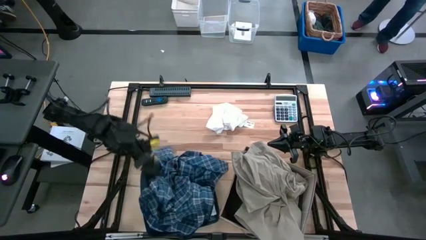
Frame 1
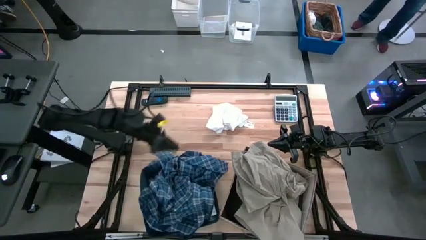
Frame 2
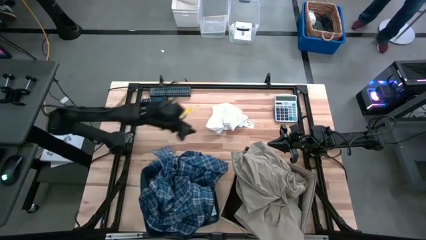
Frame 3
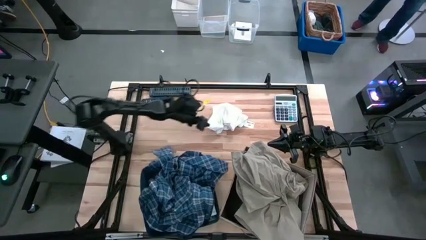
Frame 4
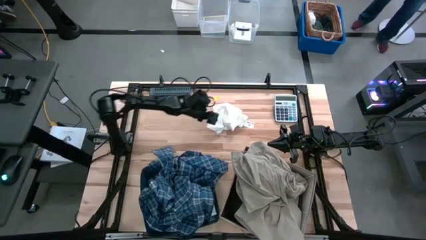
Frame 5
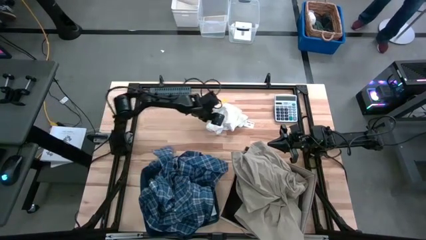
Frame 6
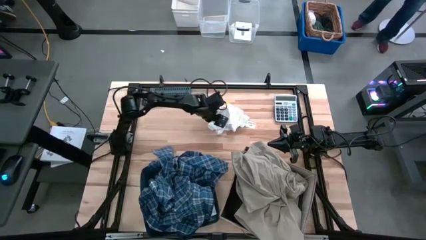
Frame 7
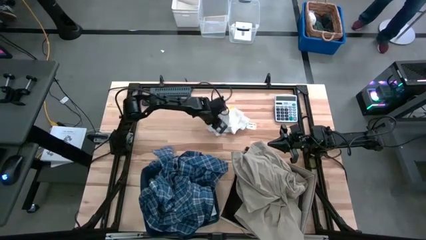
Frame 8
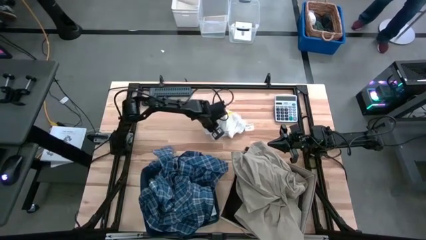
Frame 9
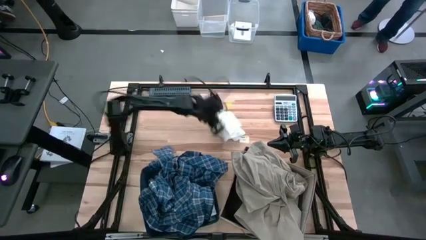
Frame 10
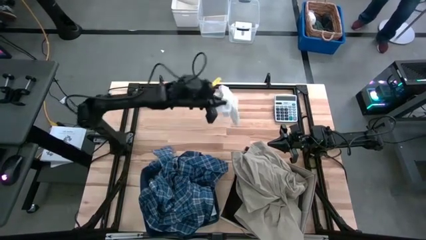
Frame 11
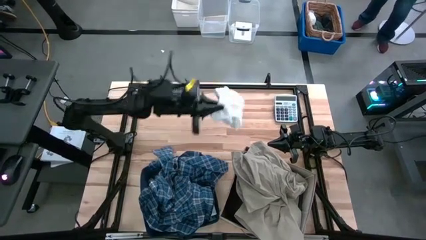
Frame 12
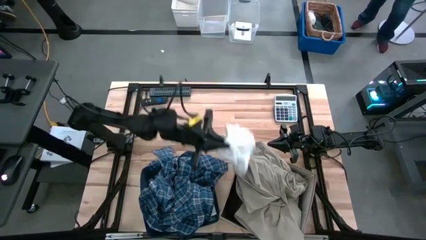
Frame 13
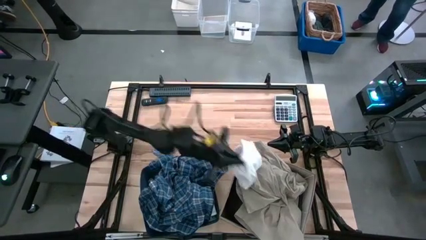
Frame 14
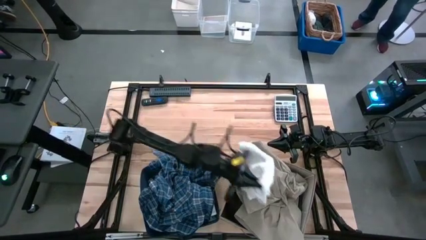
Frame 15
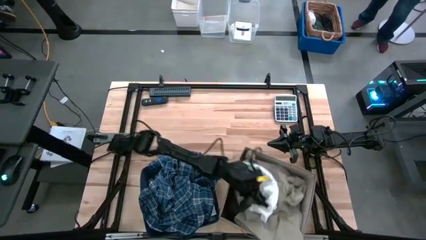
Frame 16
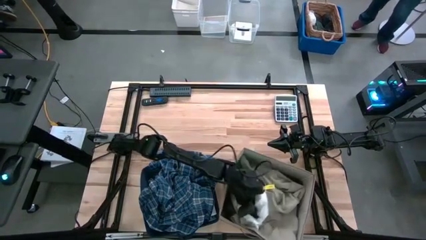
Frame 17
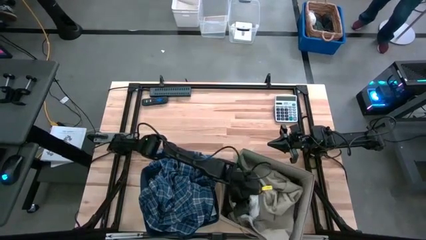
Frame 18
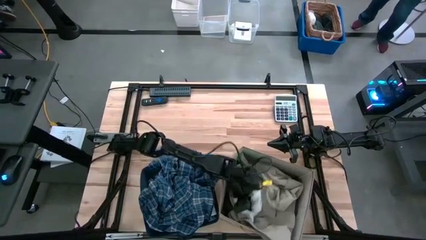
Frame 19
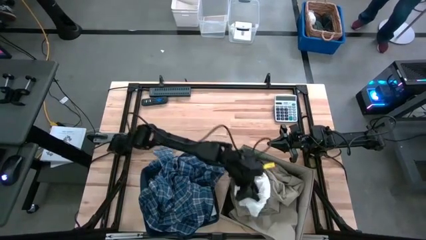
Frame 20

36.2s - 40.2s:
Task: Sort clothes
Put the white shorts into the laundry organizer

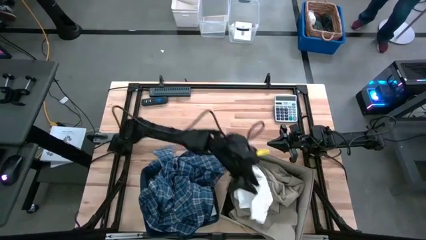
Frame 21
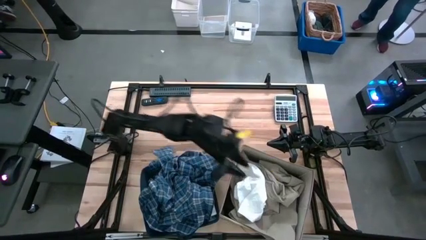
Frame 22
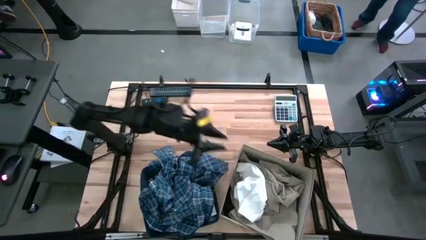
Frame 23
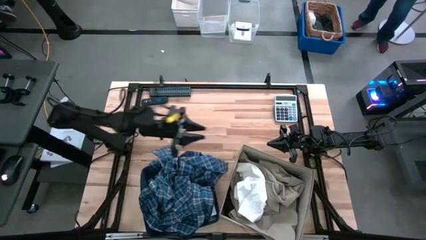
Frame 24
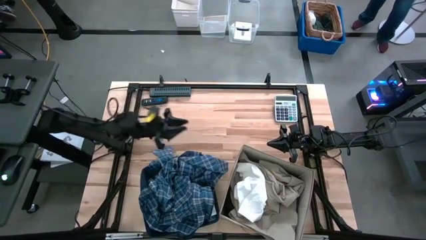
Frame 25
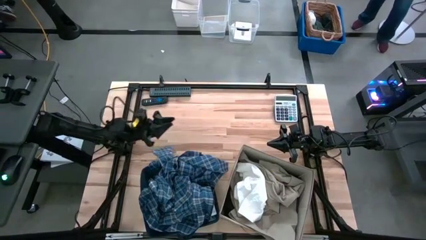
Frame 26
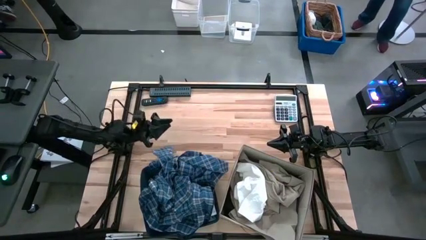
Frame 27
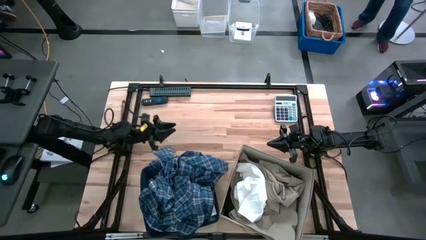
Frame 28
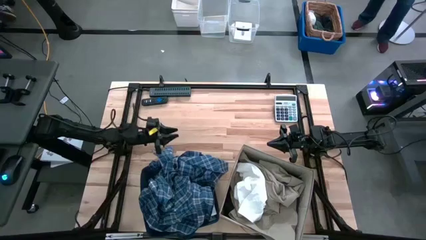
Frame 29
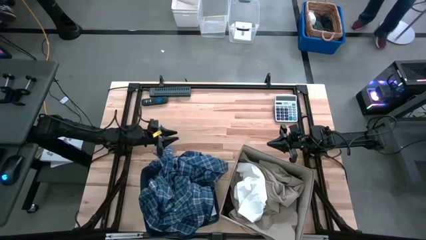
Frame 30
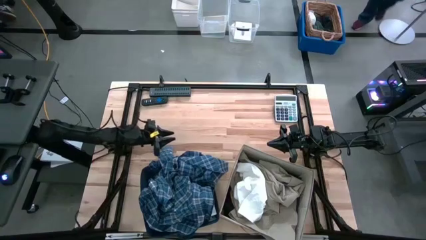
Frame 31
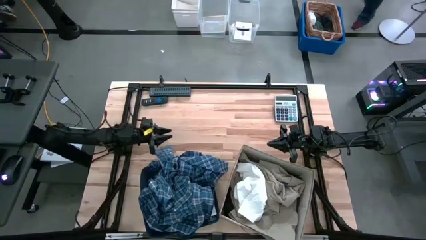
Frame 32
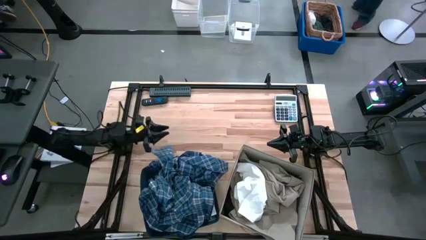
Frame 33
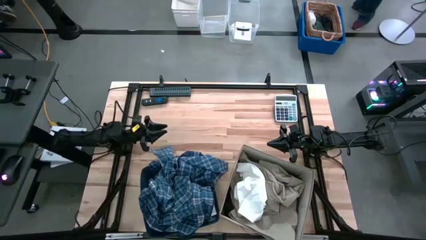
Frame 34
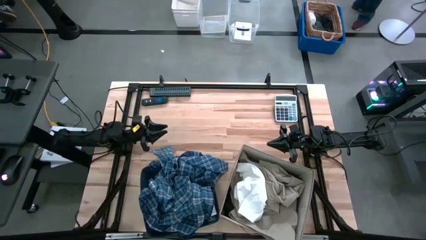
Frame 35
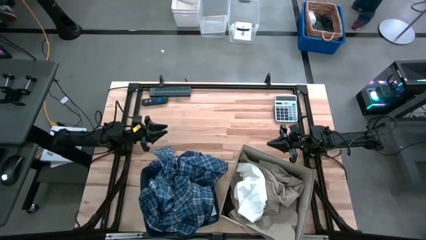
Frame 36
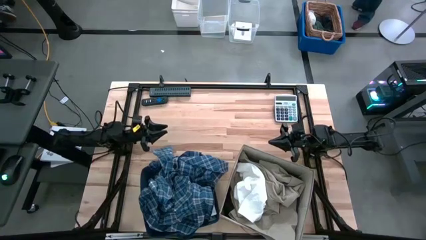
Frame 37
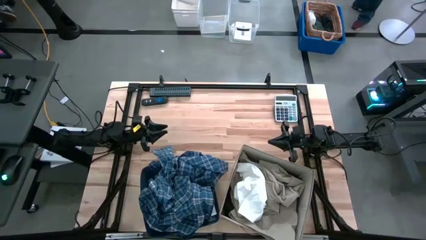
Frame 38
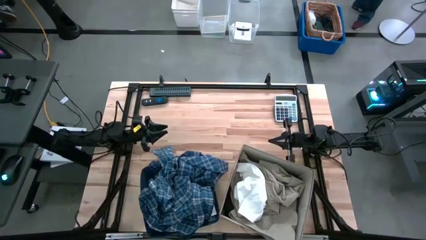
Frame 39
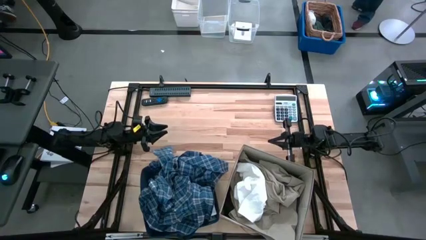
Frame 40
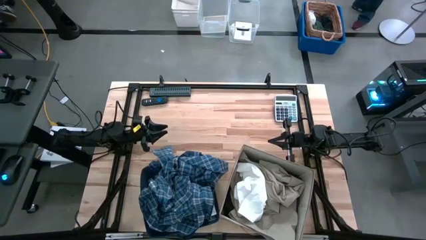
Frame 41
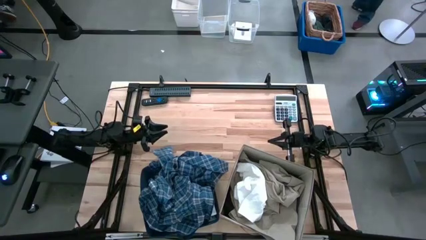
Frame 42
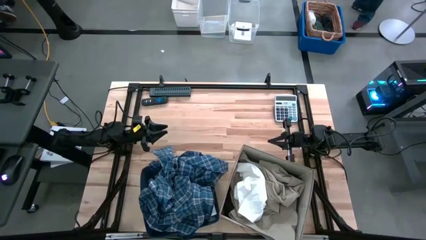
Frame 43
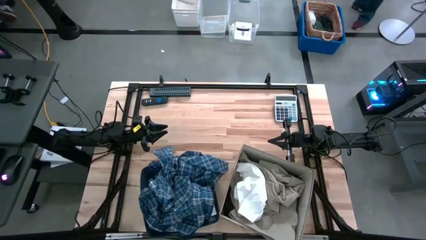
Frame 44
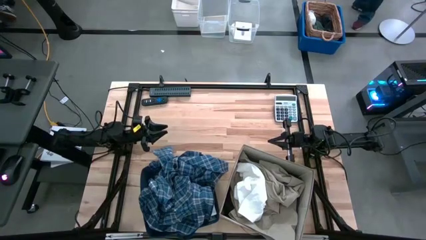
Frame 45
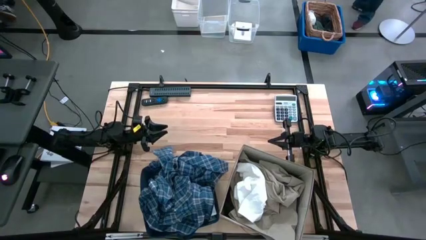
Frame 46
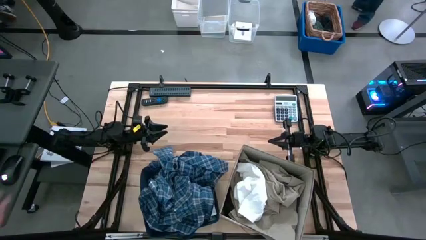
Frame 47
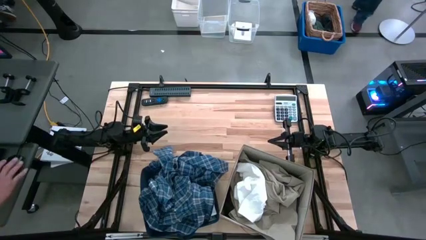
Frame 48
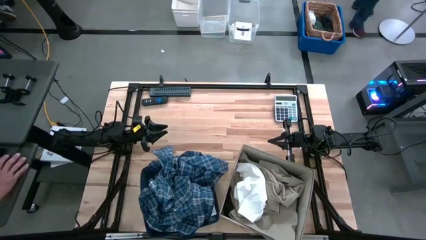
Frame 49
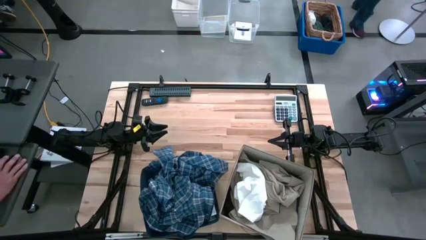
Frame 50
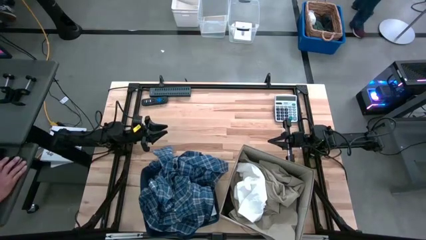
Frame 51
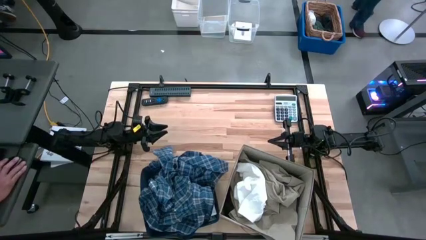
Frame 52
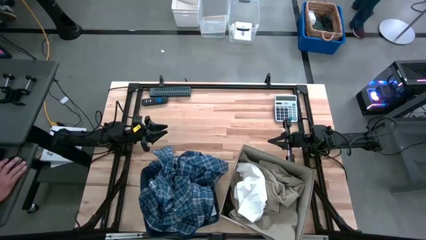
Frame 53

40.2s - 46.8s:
Return to Home Position

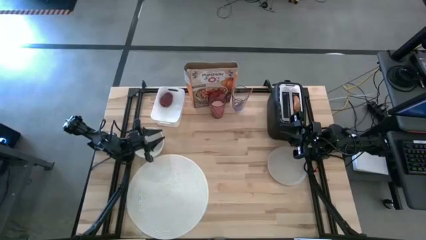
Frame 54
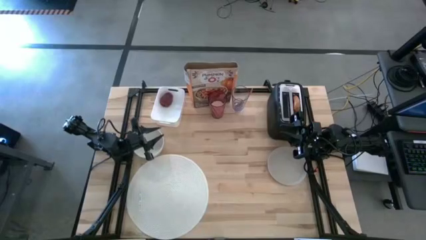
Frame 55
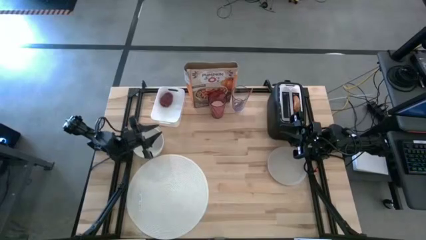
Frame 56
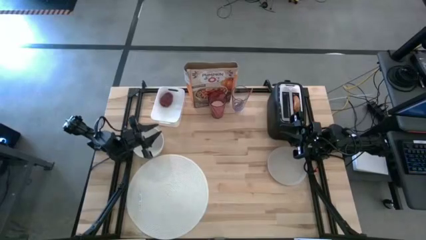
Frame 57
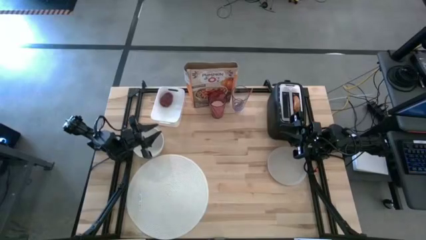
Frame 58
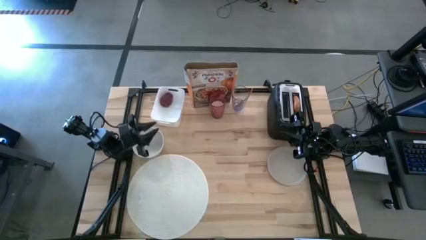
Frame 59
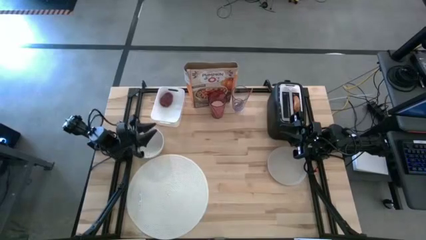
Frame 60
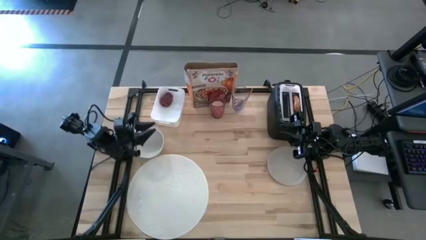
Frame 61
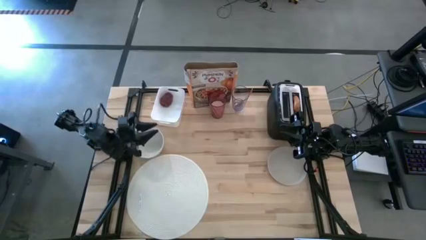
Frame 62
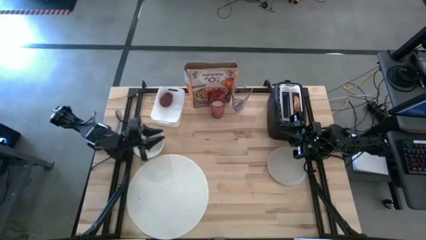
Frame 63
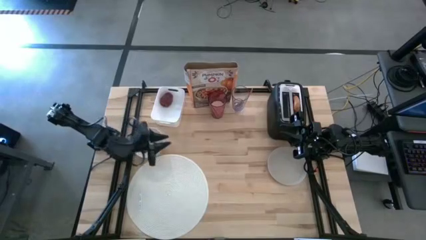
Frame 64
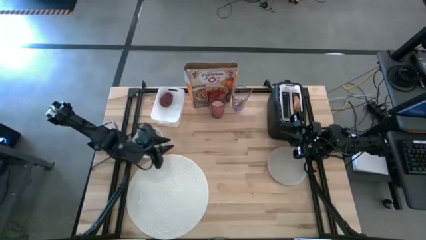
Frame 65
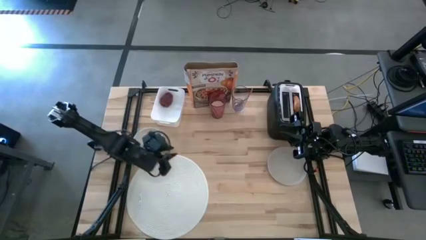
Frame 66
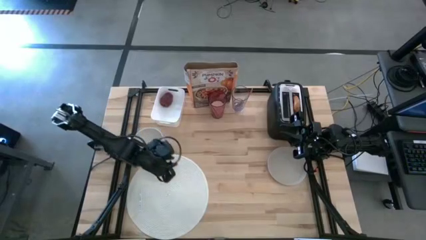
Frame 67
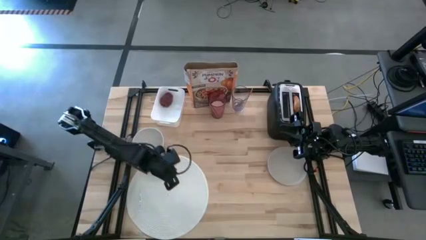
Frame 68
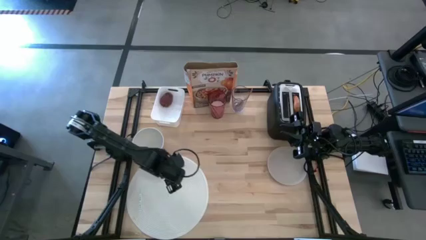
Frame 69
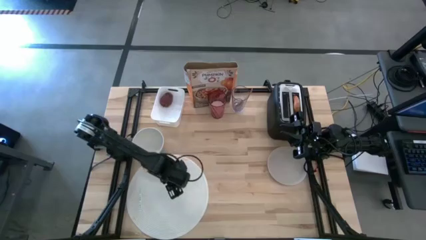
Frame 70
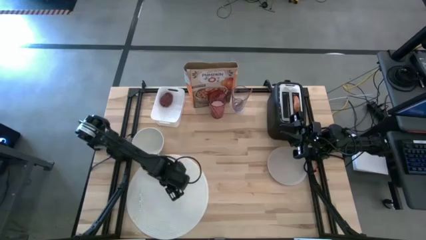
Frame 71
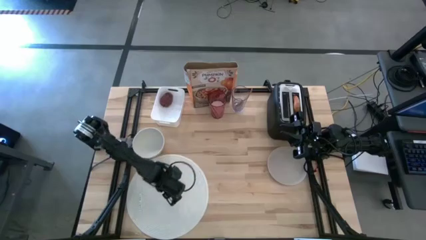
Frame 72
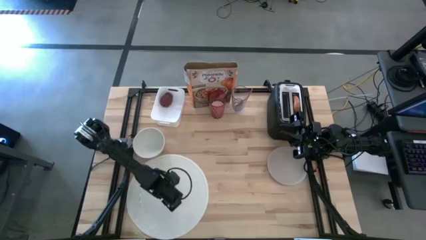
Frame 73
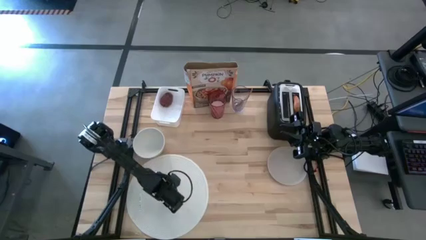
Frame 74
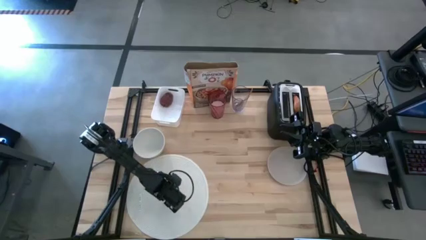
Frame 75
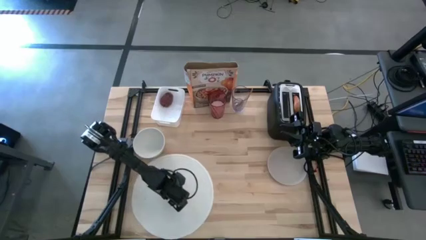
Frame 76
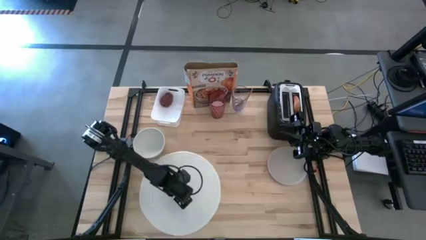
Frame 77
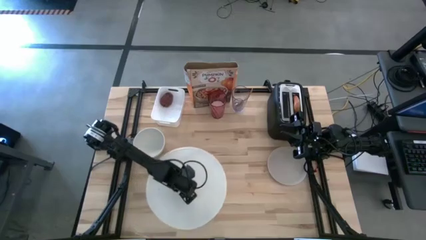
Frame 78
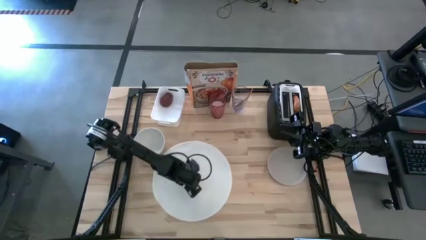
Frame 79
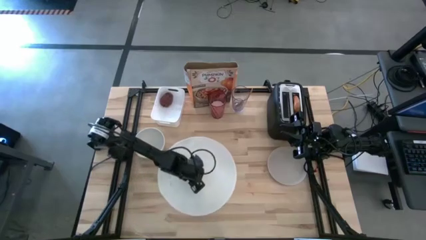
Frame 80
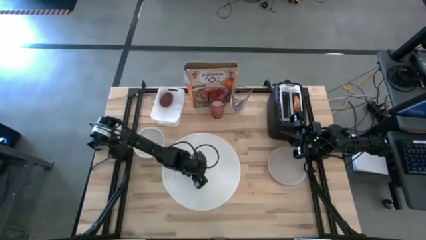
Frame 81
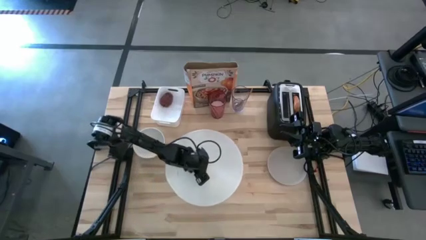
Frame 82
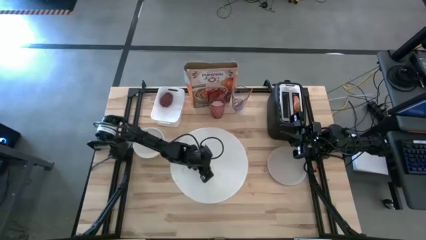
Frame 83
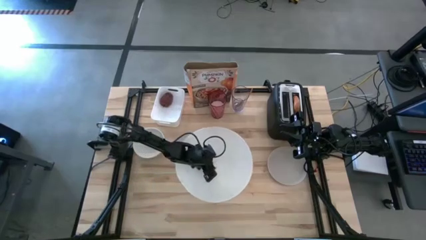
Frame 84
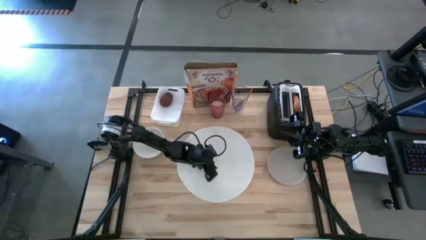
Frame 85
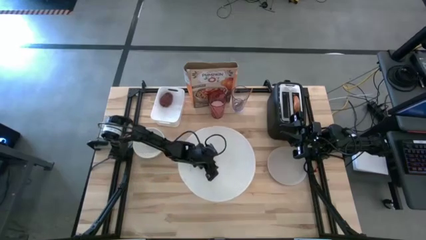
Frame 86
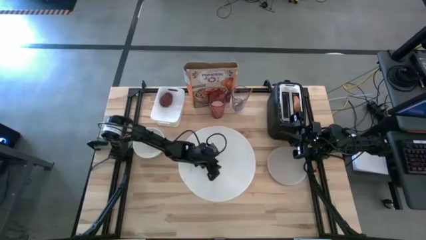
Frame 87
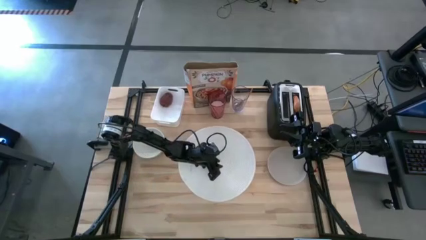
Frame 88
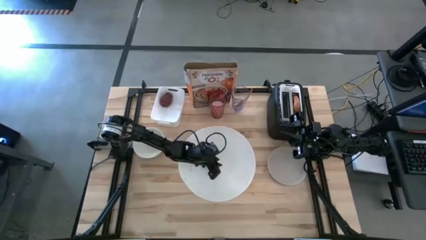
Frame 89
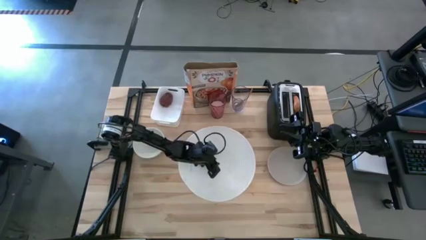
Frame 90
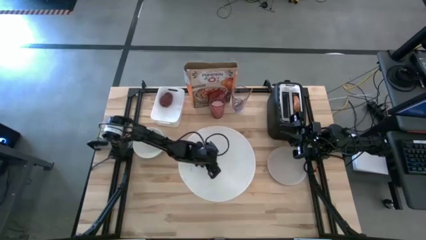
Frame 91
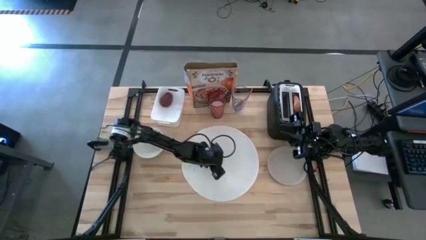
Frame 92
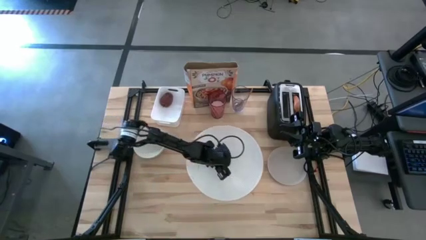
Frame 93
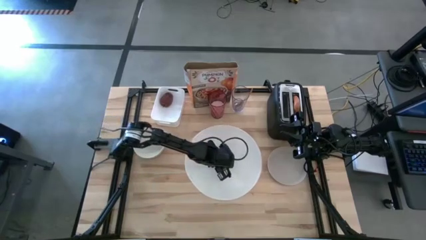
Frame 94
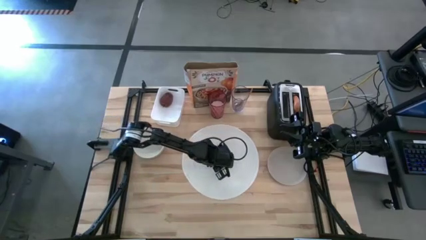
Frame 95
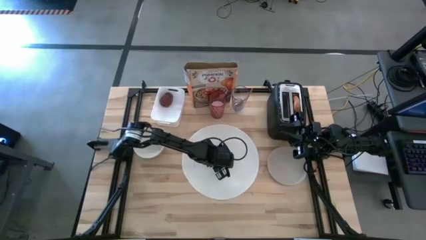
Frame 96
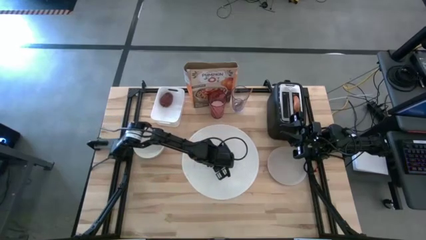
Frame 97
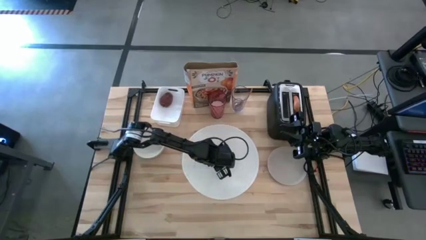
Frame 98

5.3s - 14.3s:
Task: Arrange a breakfast setting
Move the white placemat to the center of the table
